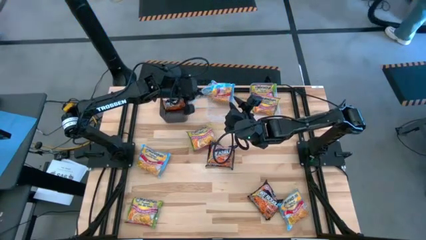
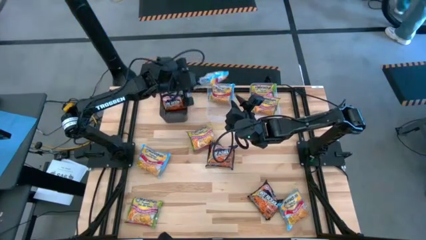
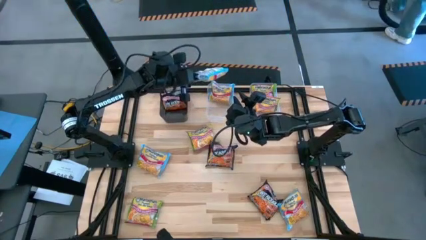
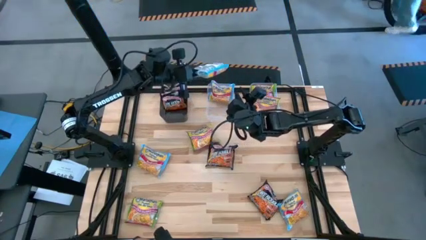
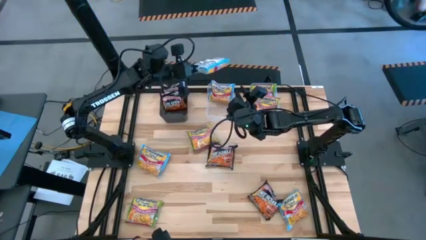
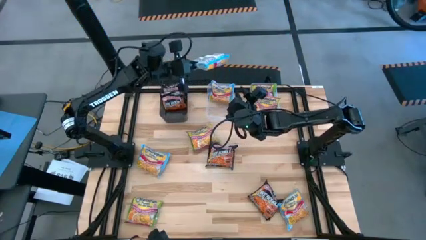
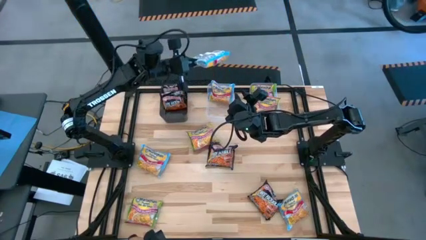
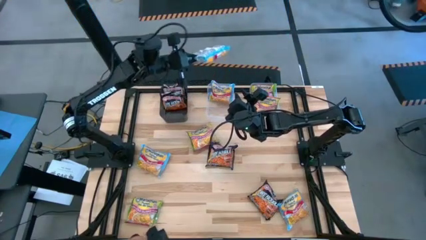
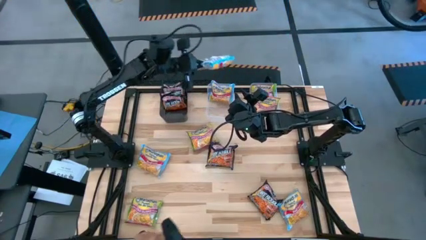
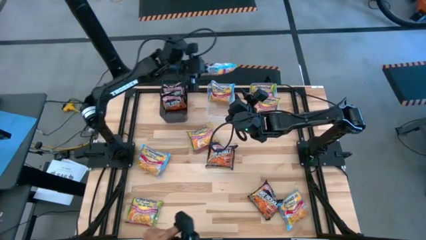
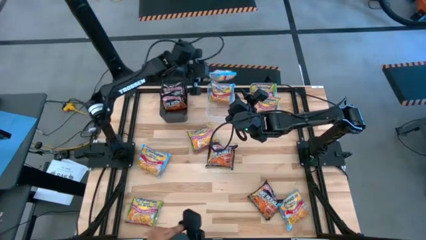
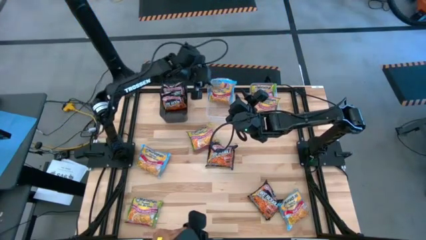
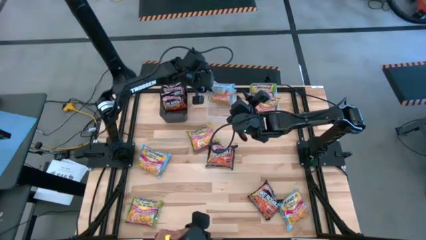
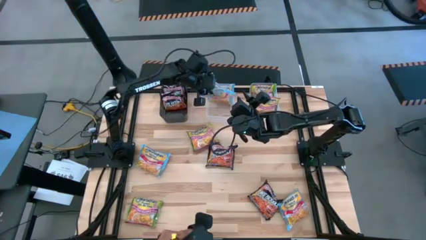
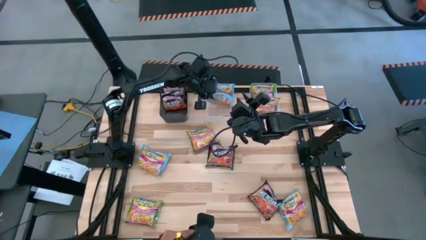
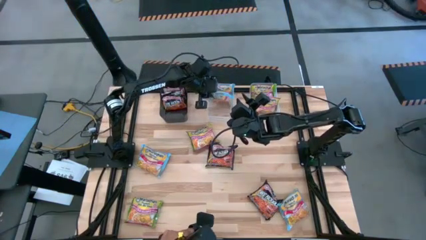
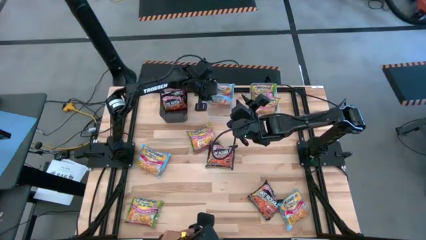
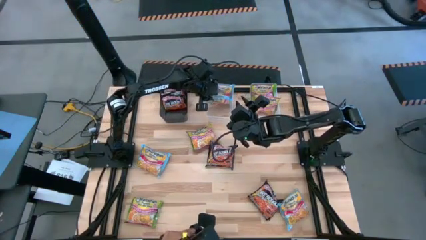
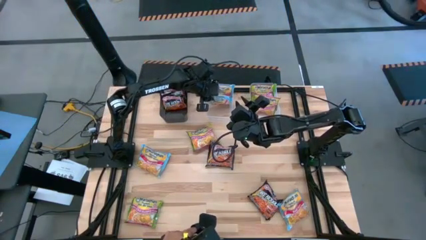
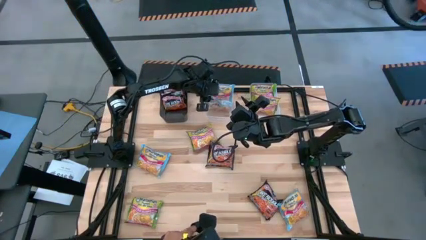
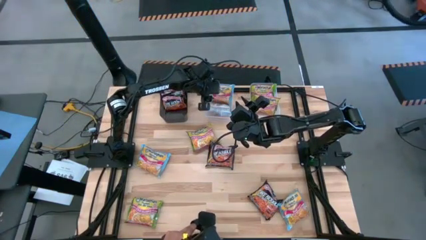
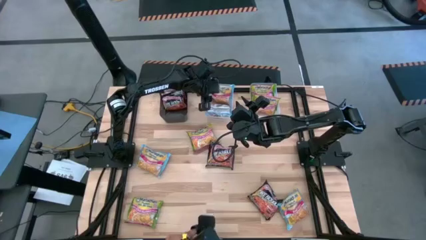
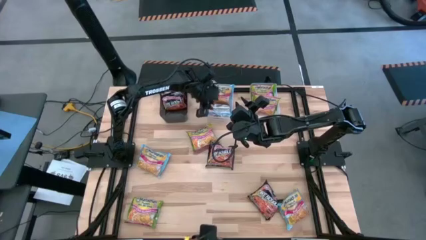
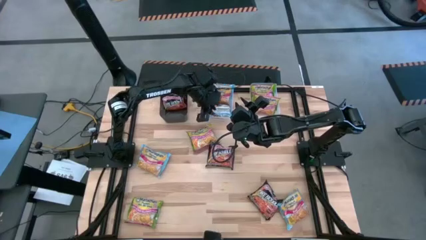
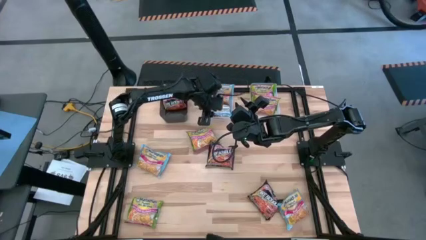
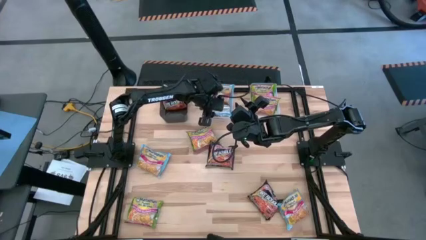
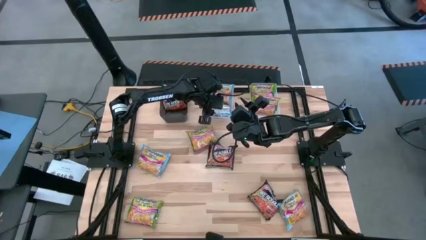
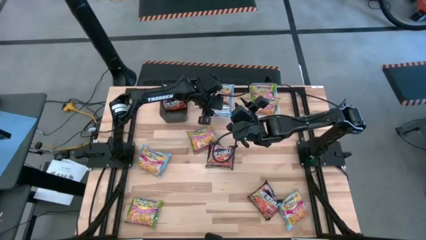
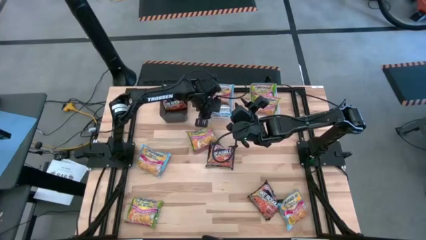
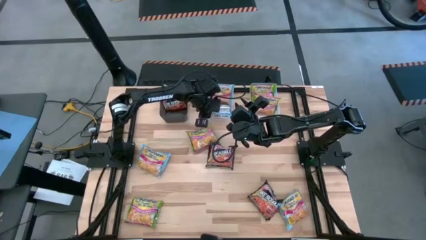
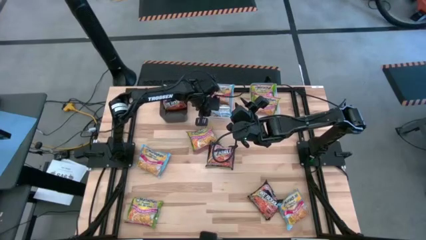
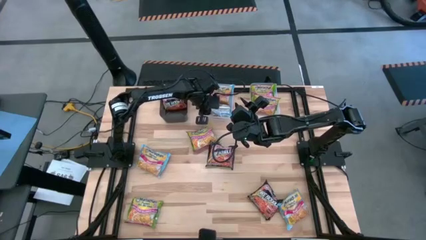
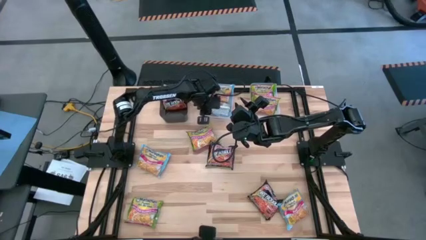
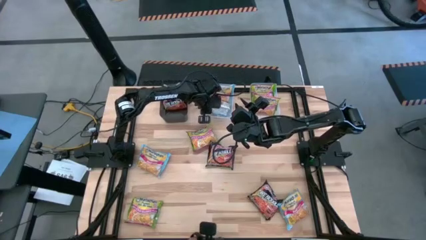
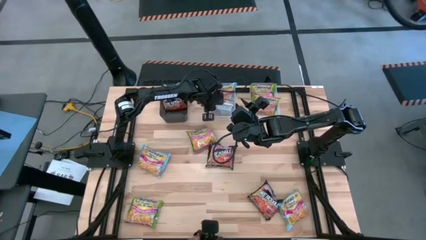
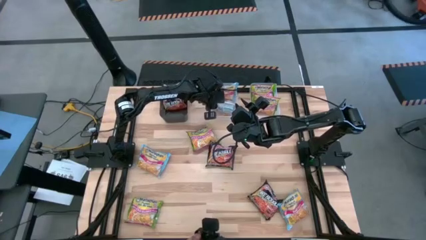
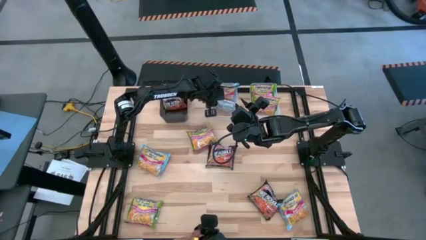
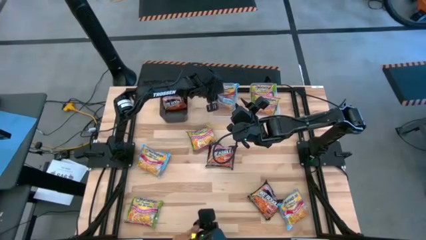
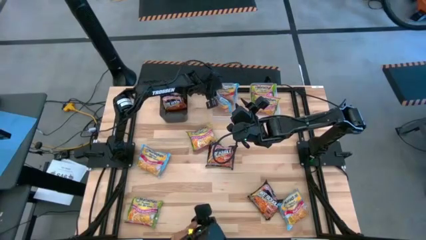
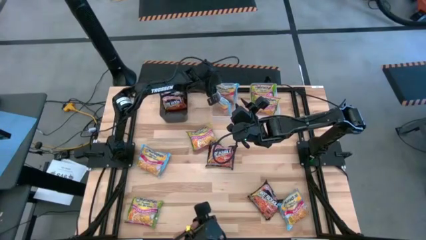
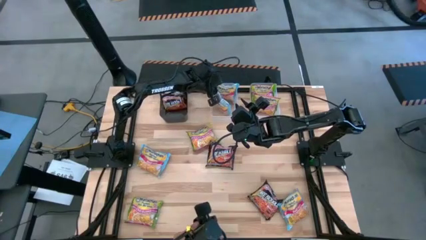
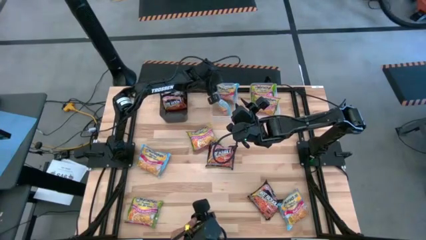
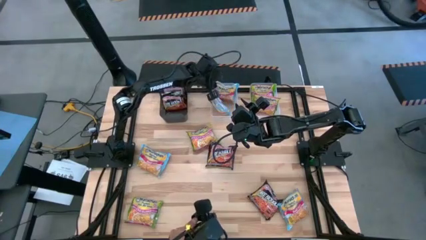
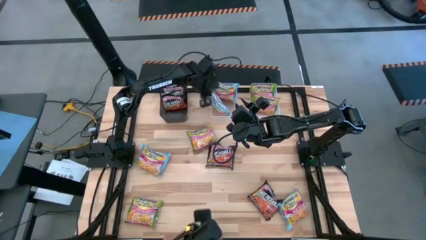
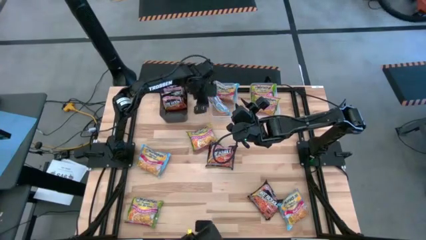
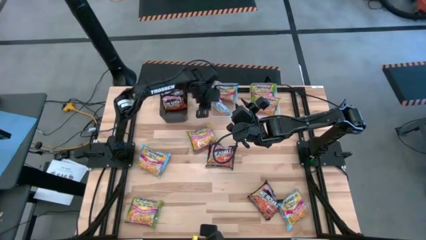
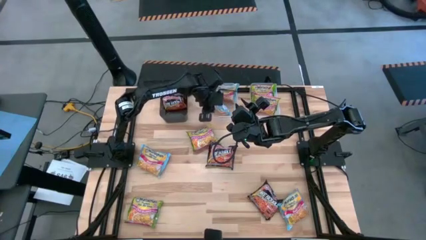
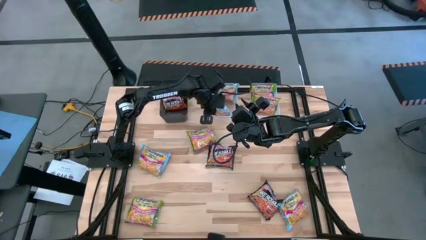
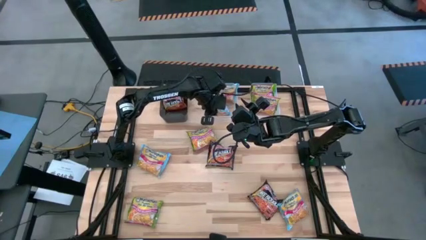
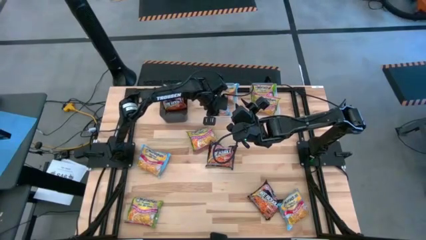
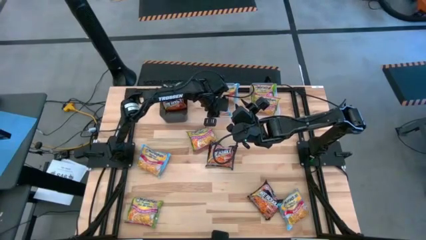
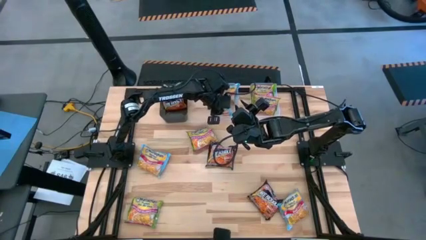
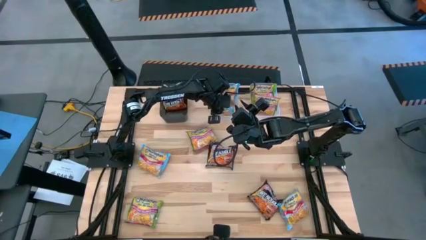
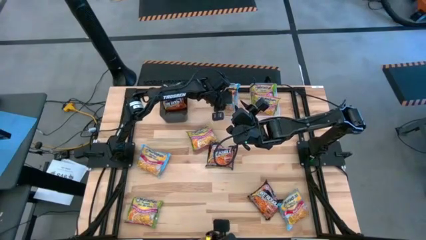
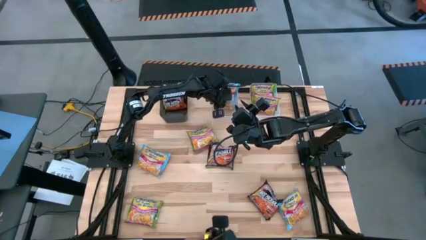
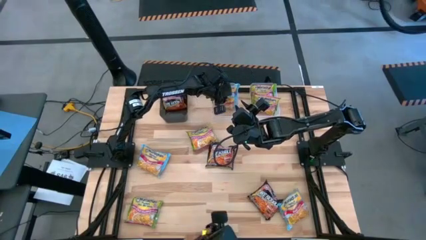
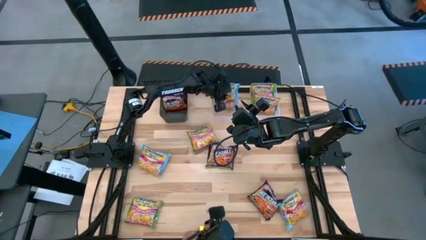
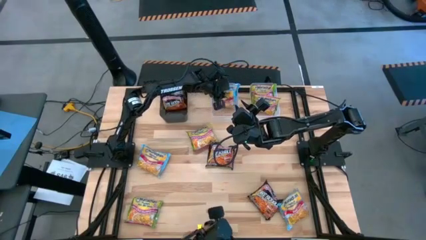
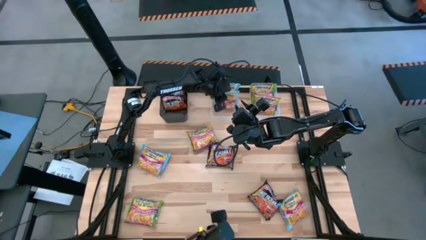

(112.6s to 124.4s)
Task: Sort Maruchan noodles
Put the top right blue noodle pack into the left transparent bin

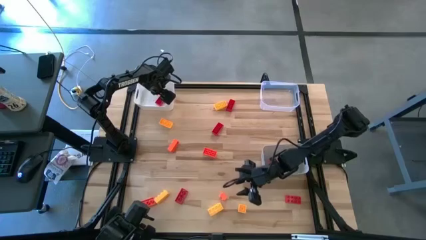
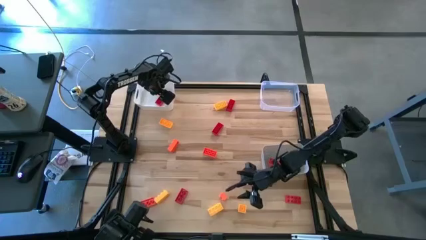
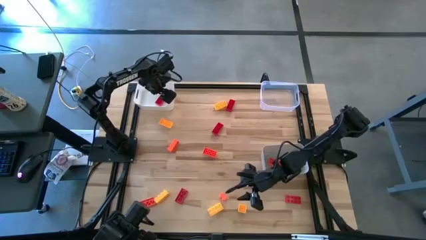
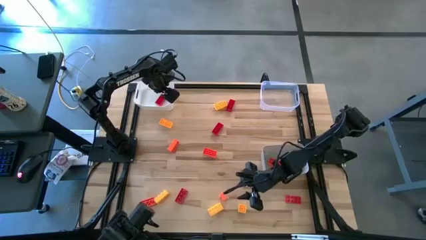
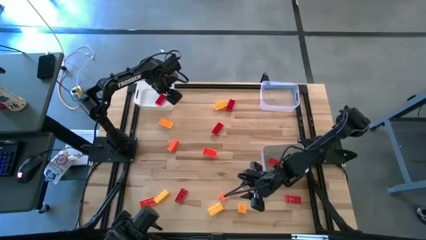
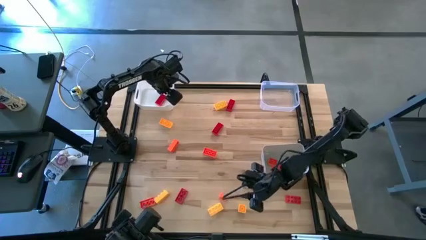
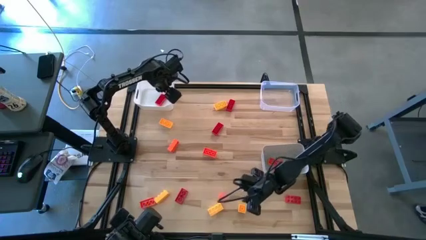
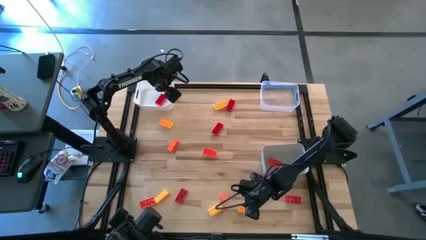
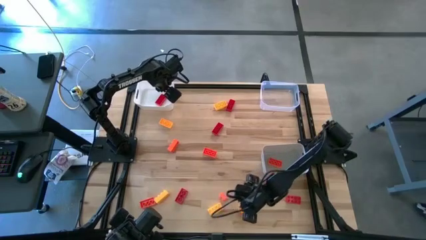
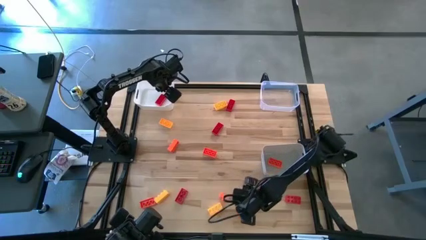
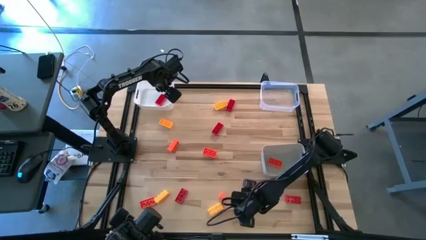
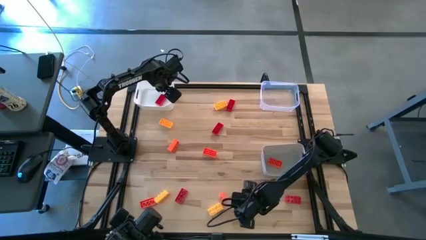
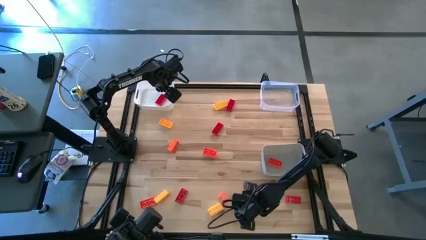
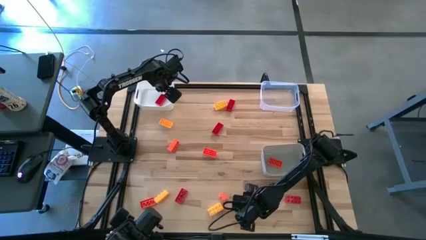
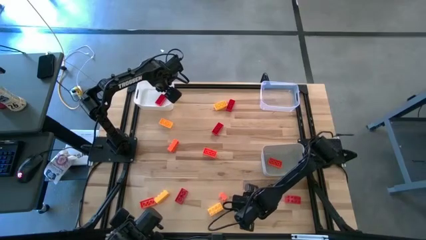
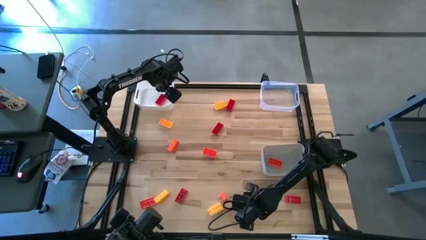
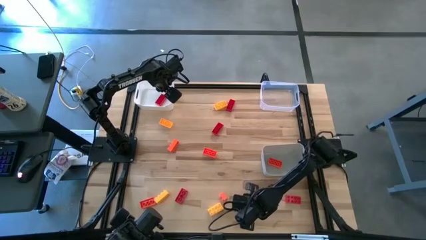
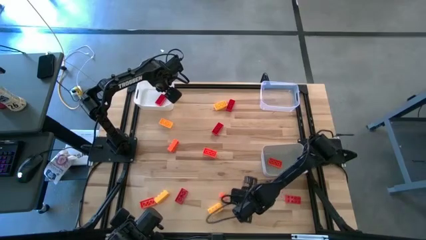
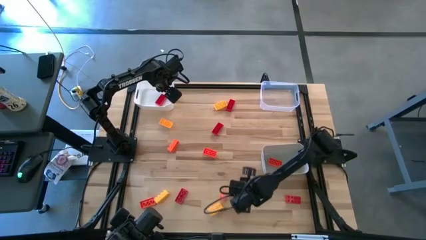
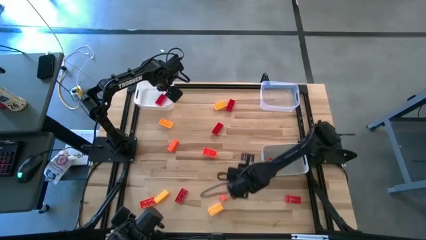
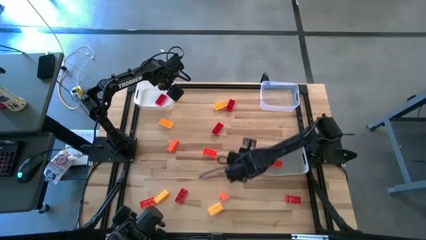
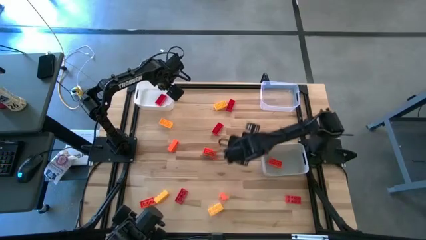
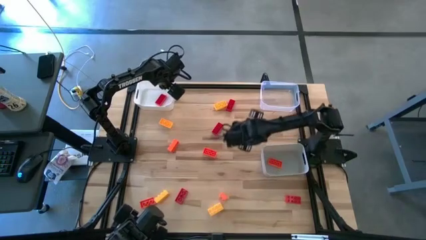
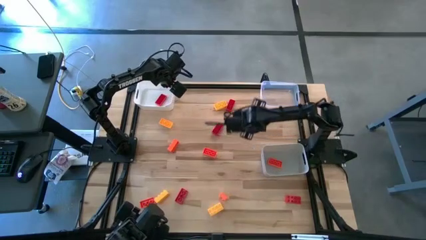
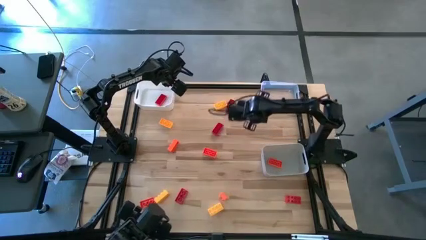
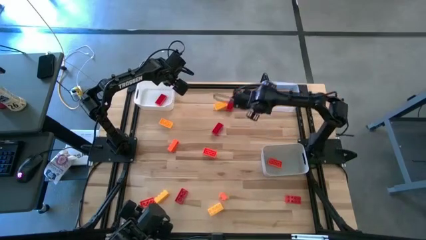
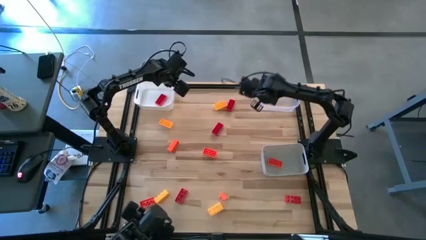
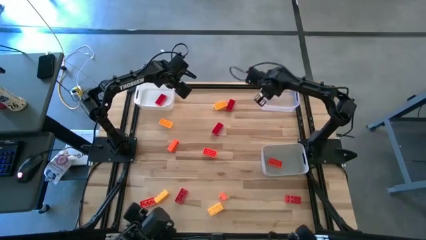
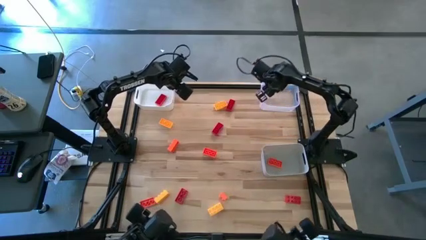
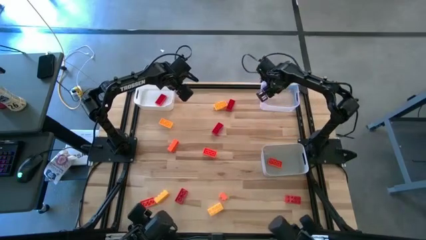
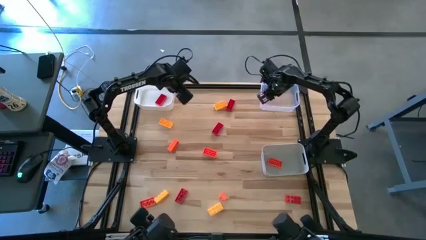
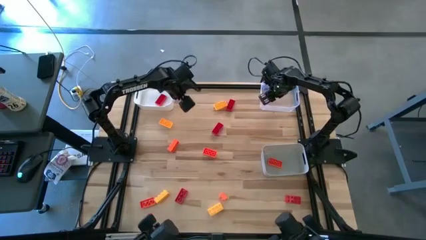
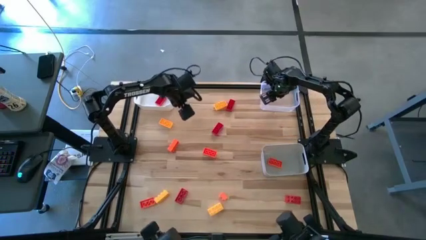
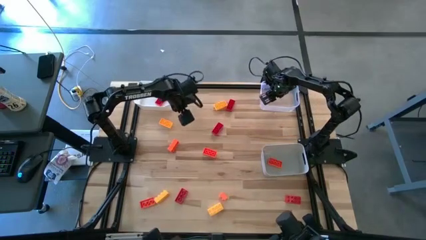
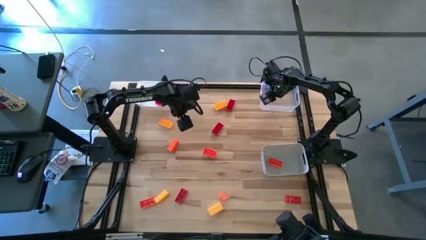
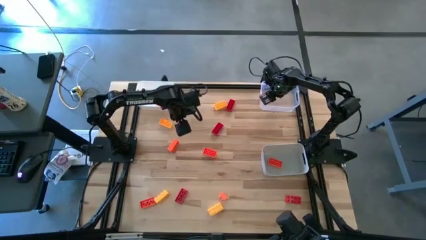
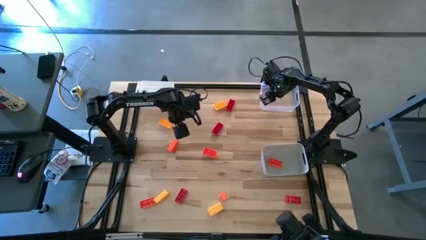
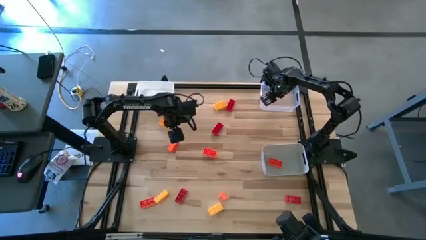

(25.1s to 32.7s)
Task: Sort & place blocks by color
Put the yellow game piece into the transparent bin
